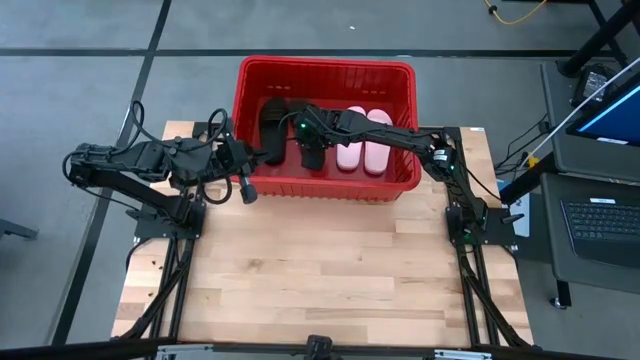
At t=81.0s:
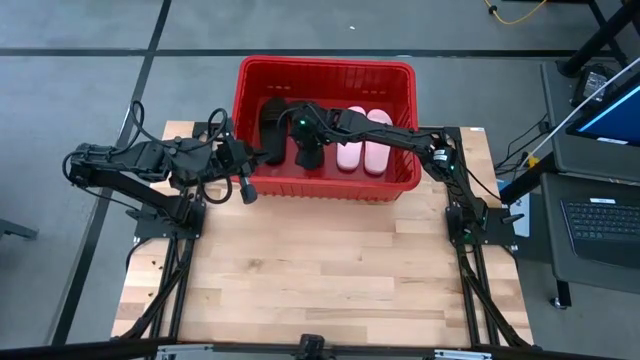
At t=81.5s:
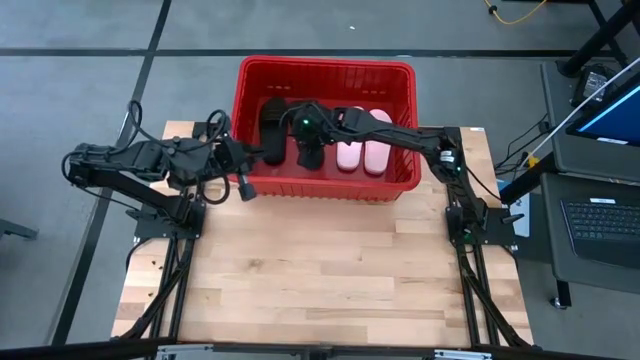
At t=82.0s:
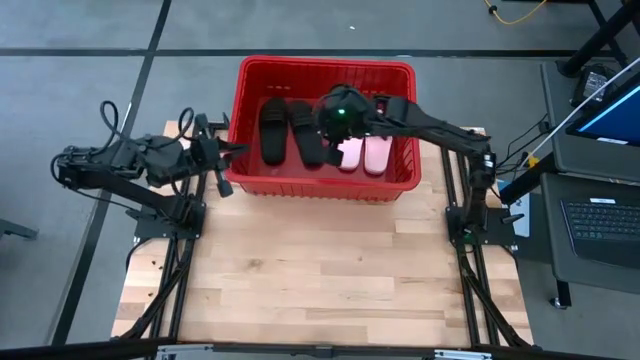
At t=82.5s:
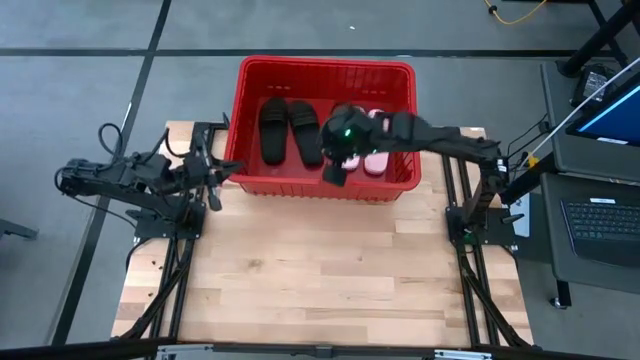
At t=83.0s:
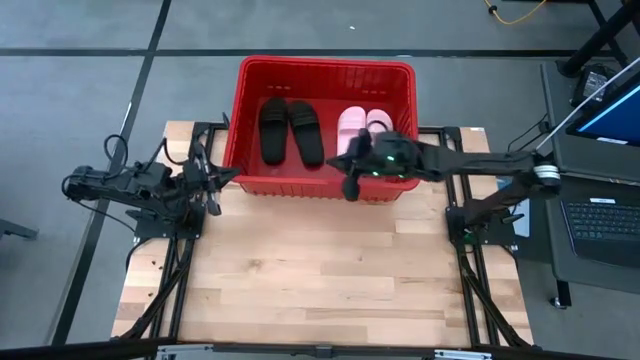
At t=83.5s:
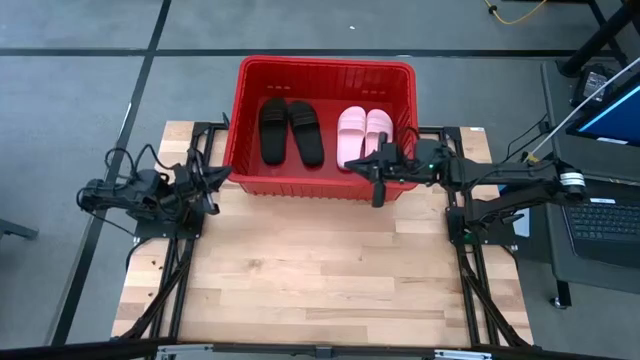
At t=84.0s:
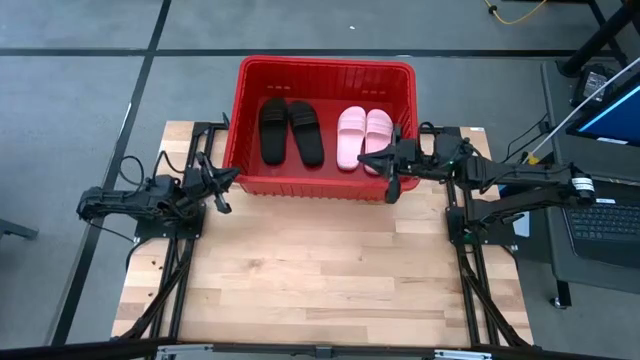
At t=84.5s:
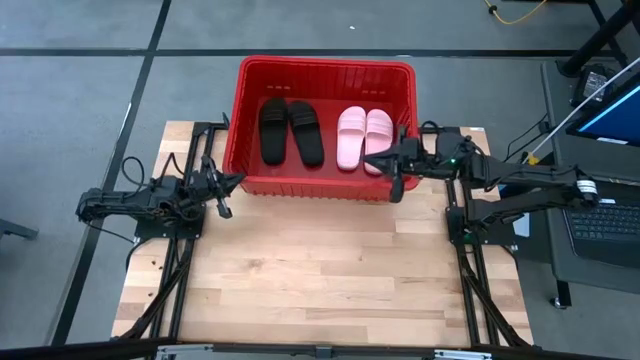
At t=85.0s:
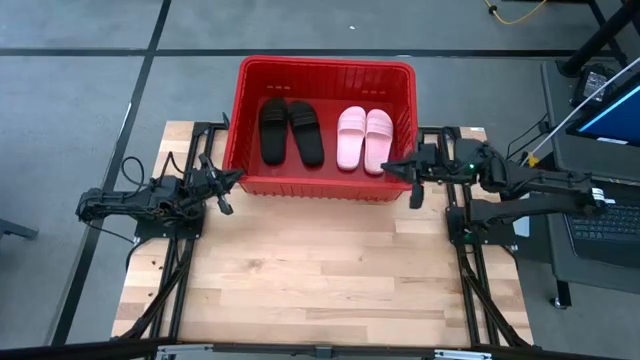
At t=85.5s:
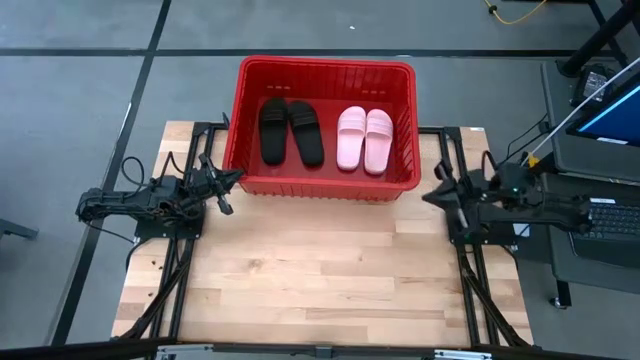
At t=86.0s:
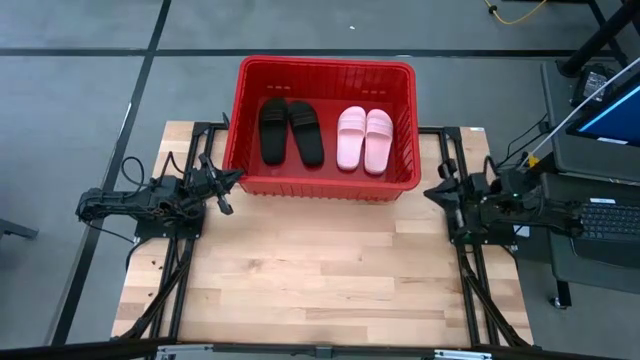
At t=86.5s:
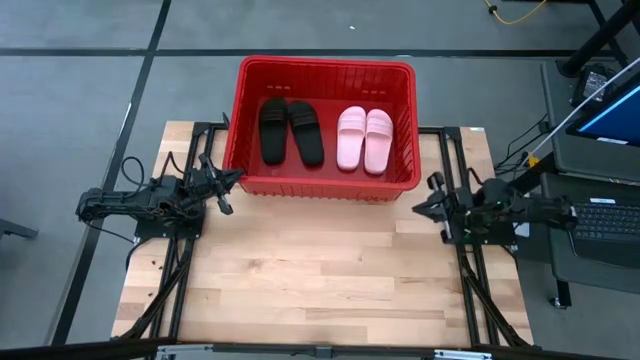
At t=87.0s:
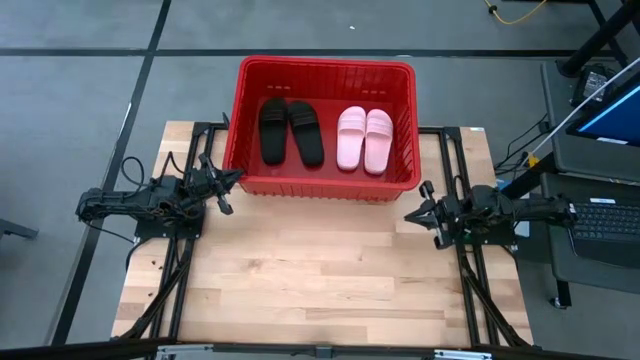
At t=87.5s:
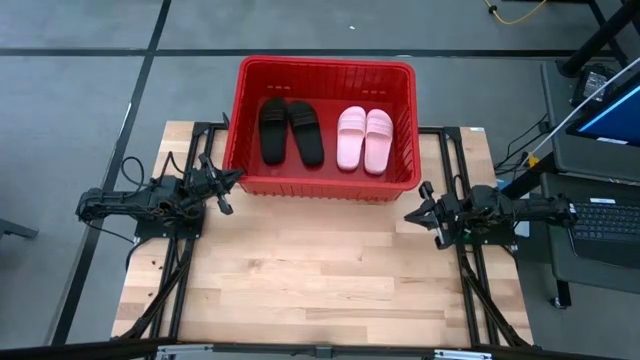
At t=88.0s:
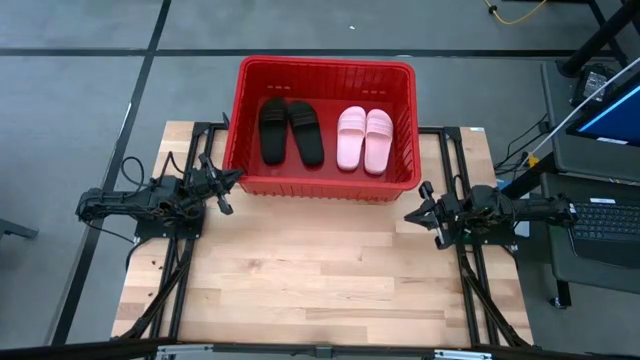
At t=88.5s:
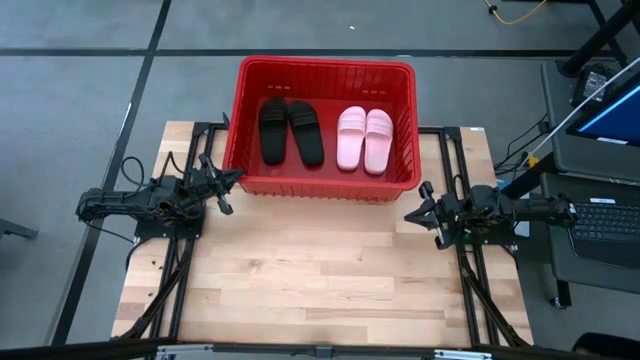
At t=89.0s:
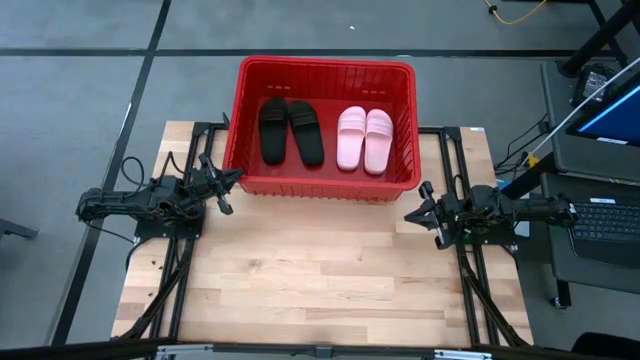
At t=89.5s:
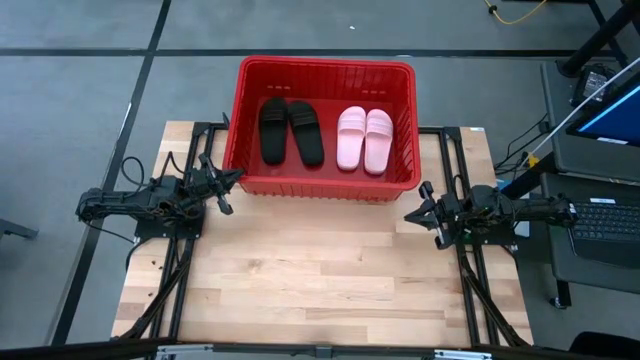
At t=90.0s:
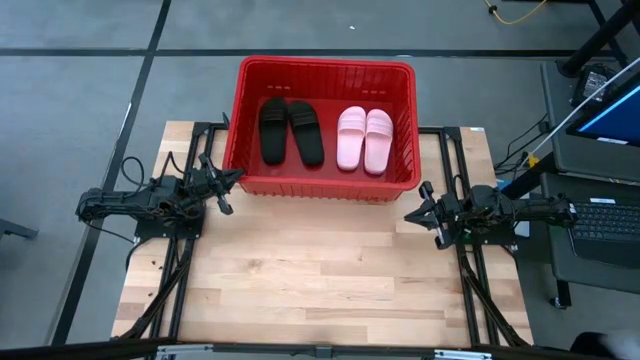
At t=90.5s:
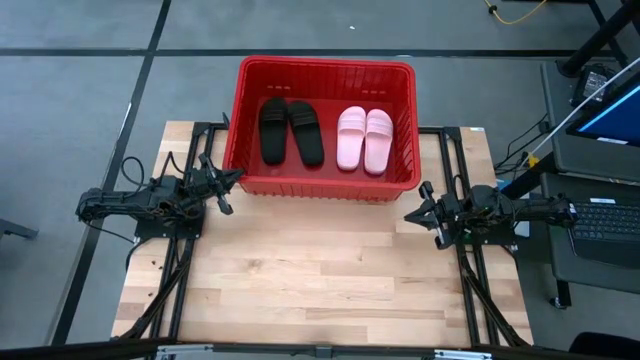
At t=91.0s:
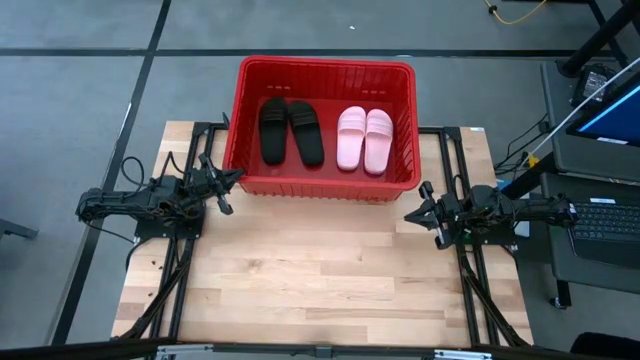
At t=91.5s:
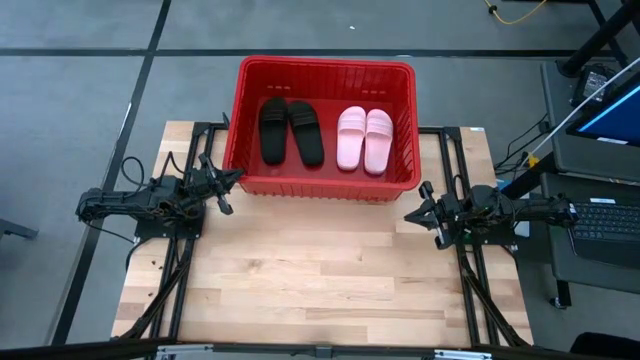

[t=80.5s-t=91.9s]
Task: Pick and place slides into bin
Return to Home Position

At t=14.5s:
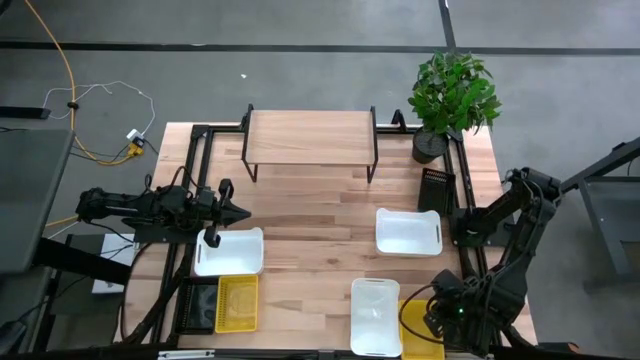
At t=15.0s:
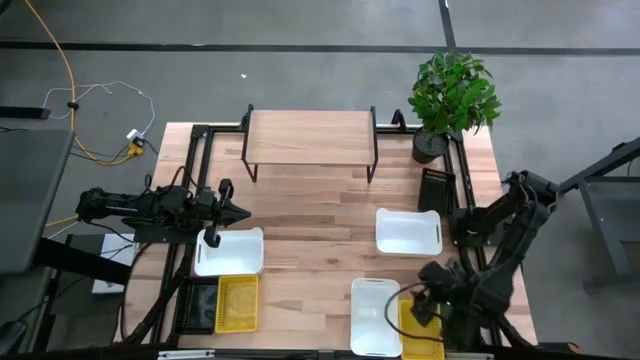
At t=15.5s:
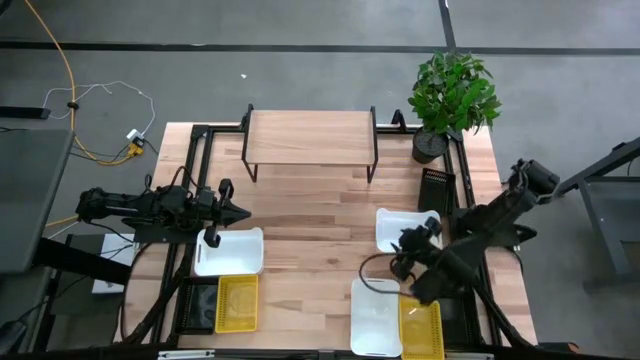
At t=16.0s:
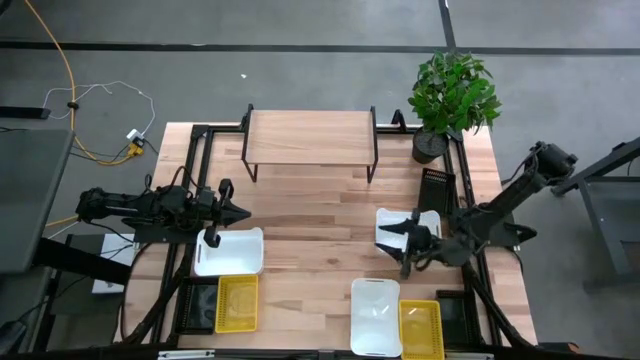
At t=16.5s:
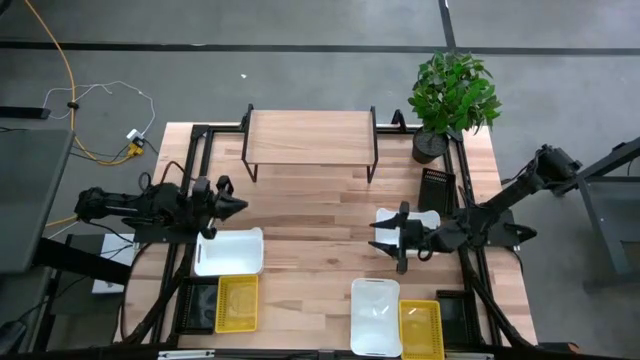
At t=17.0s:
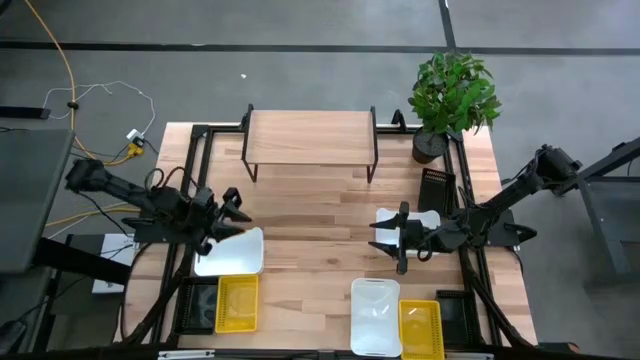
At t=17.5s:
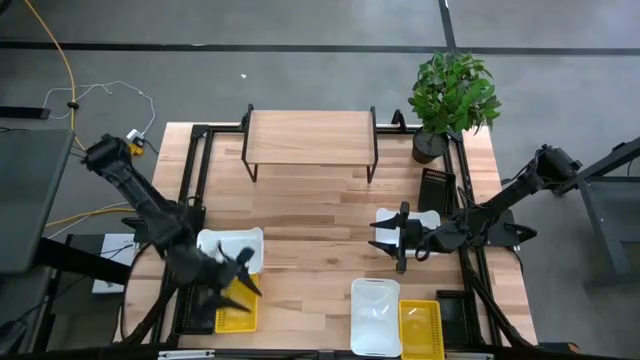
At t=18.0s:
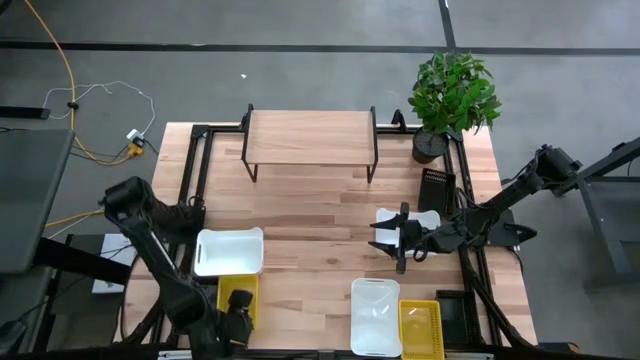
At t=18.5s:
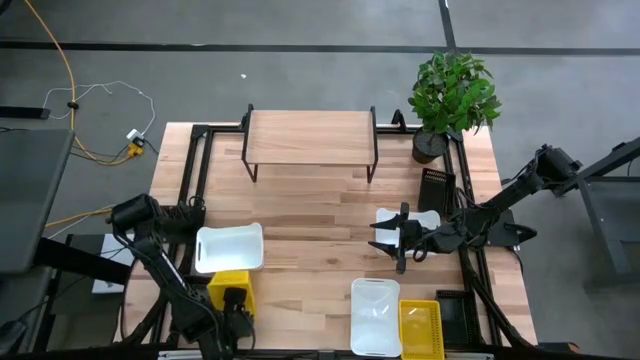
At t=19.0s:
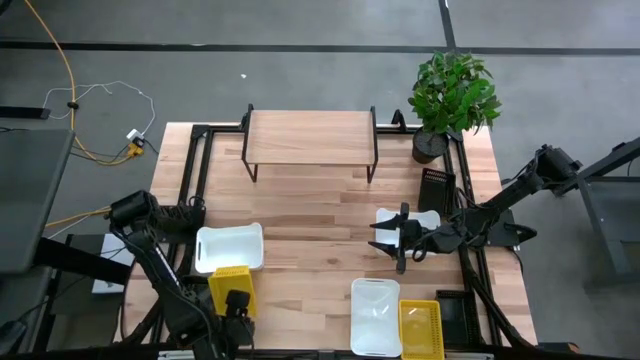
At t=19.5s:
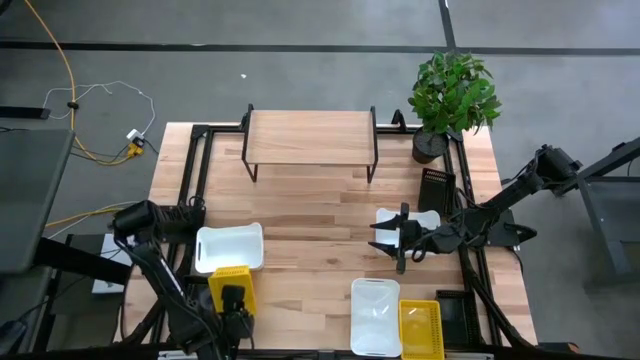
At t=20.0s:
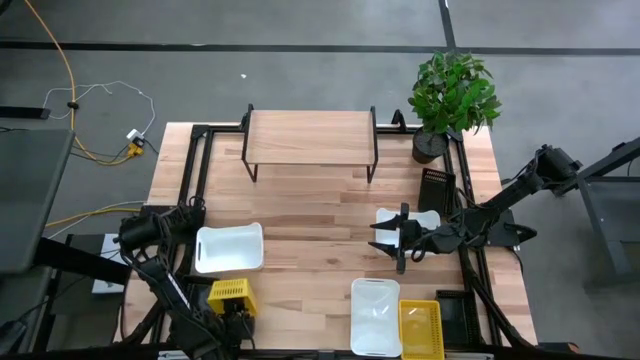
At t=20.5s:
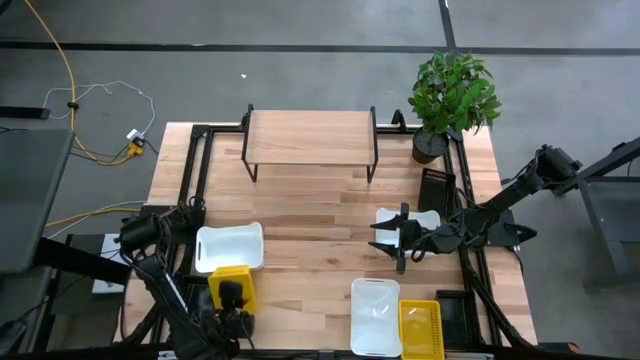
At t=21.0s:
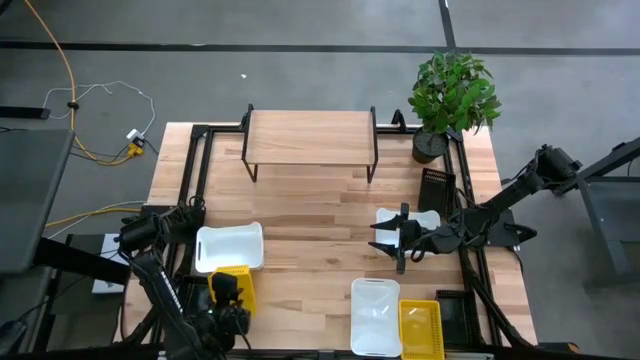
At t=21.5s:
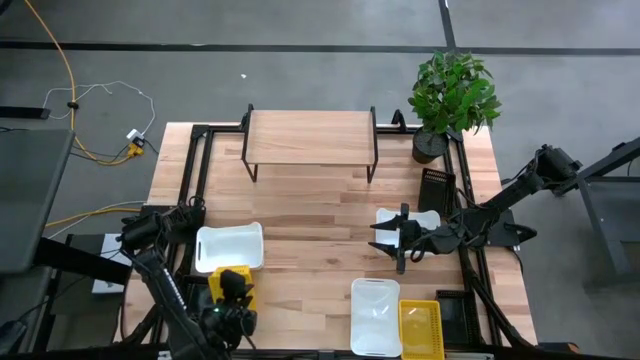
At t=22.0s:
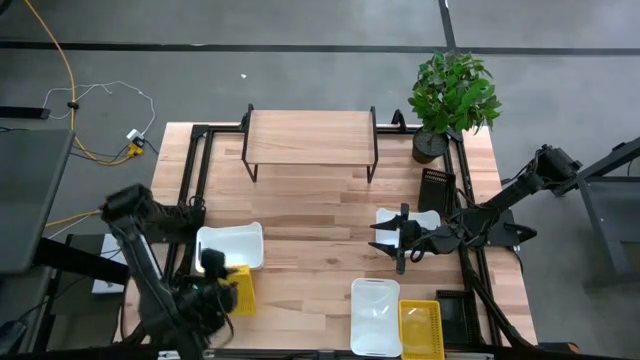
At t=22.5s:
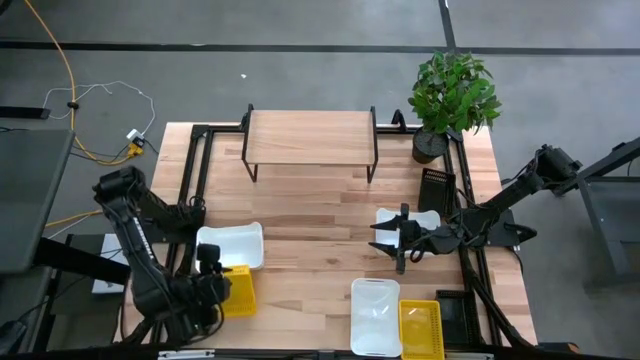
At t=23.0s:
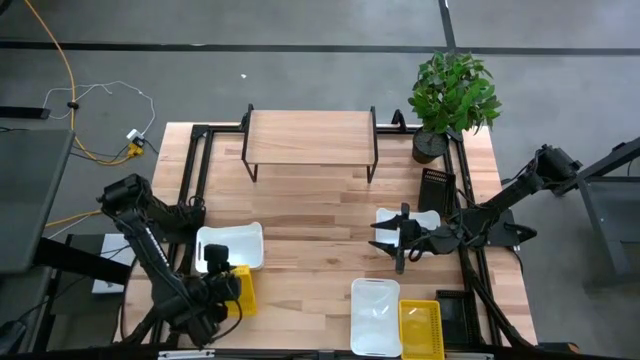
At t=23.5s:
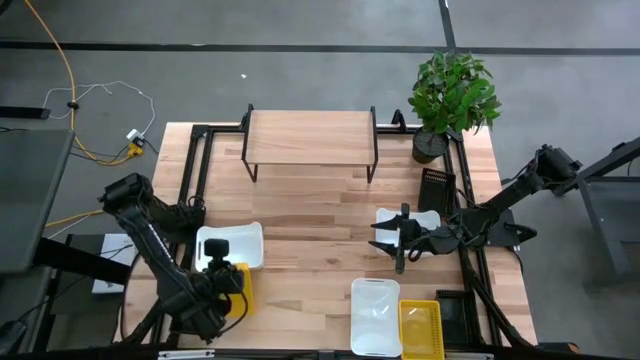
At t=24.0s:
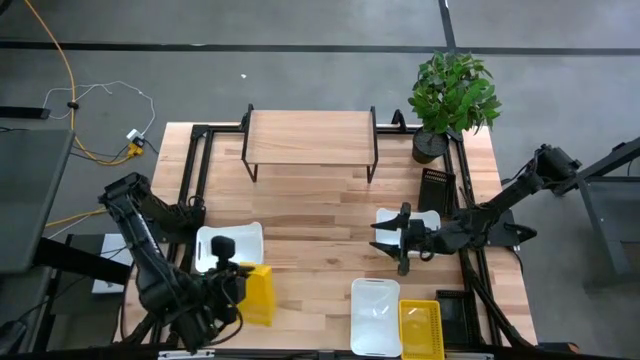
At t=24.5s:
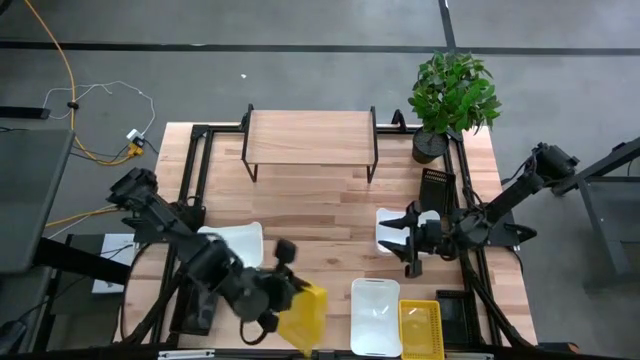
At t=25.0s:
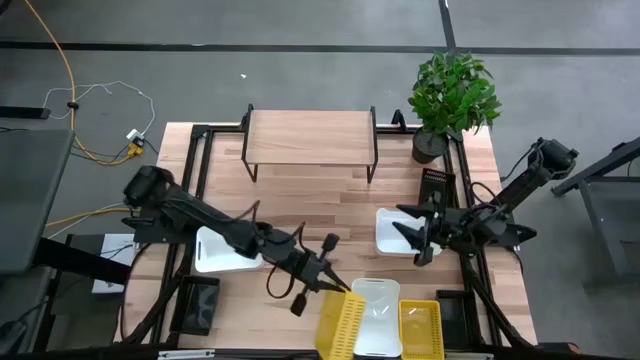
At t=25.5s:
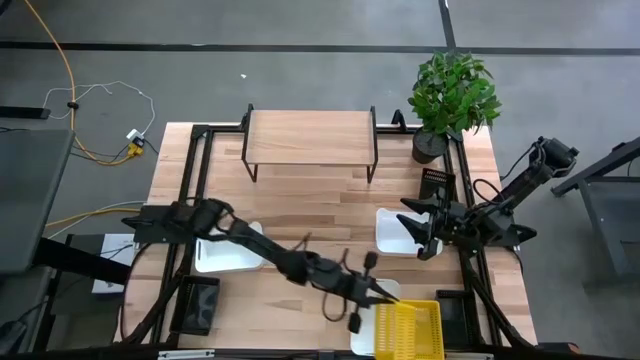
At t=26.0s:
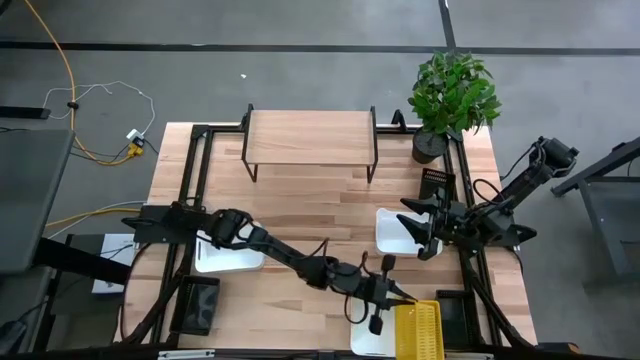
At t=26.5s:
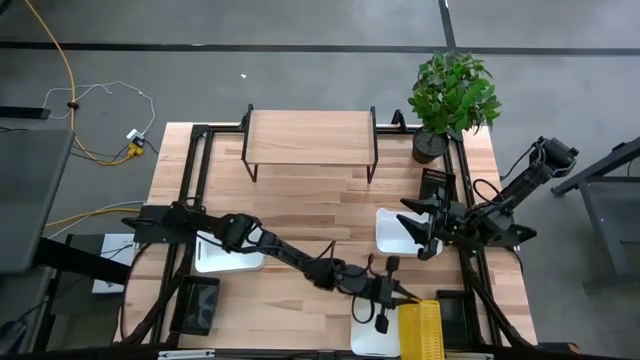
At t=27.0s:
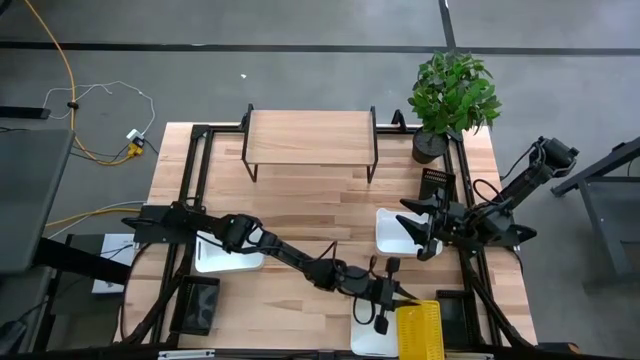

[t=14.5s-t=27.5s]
Task: Stack baskets on shelf by color
Stack the left yellow bin on the stacked yellow bins
